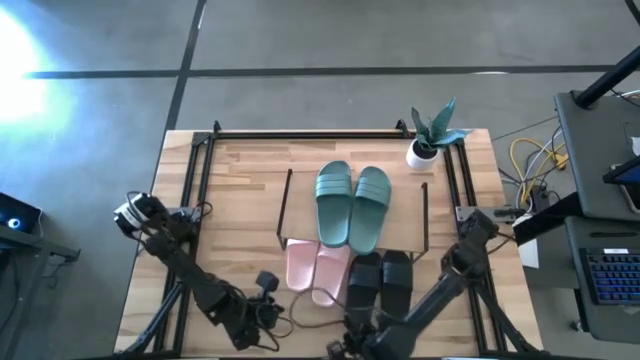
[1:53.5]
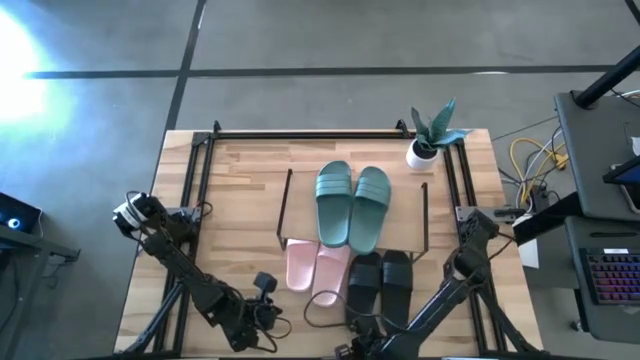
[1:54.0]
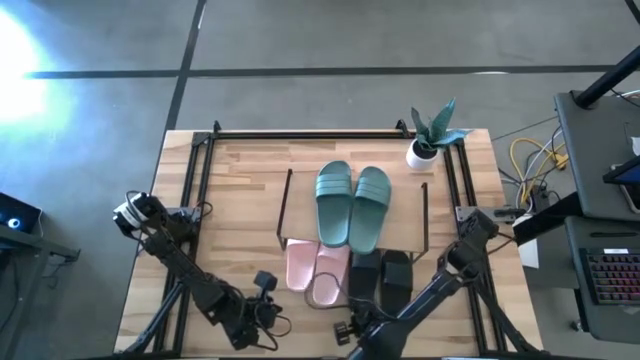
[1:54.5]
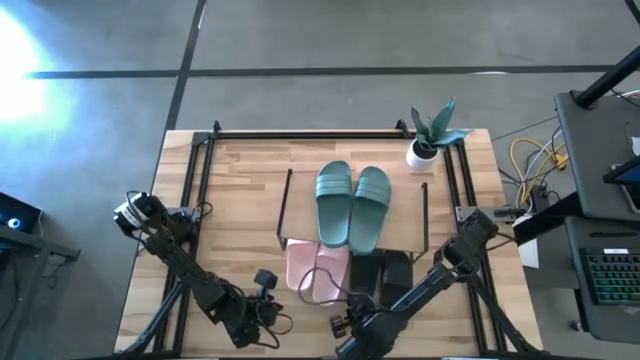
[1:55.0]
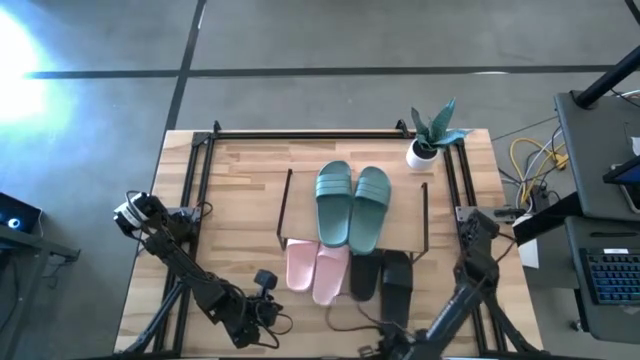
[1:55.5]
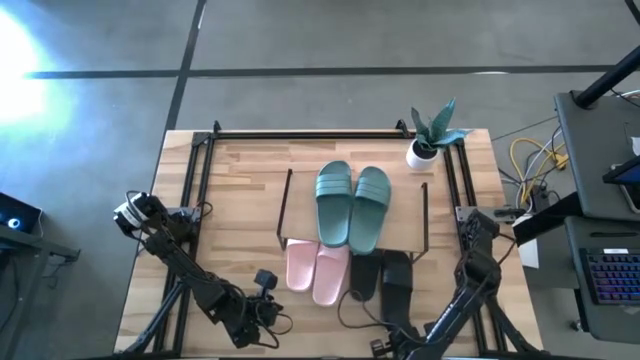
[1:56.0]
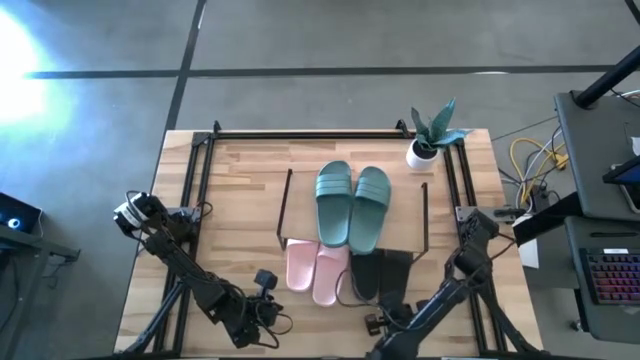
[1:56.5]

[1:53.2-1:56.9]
Task: Pick and place slides into the shelf
Adjust the black slides under the shelf

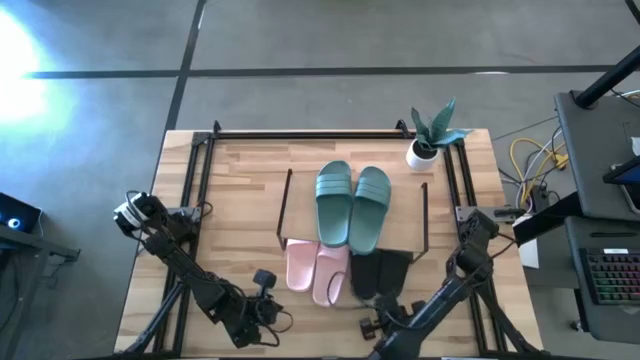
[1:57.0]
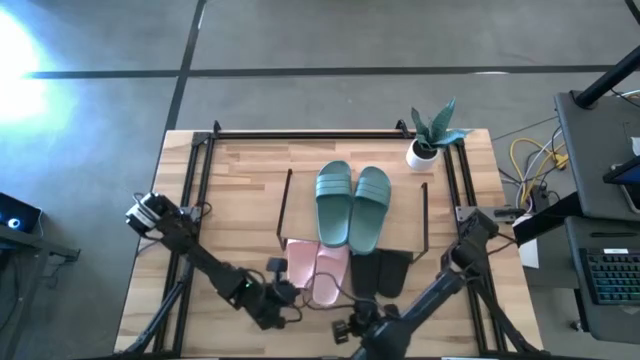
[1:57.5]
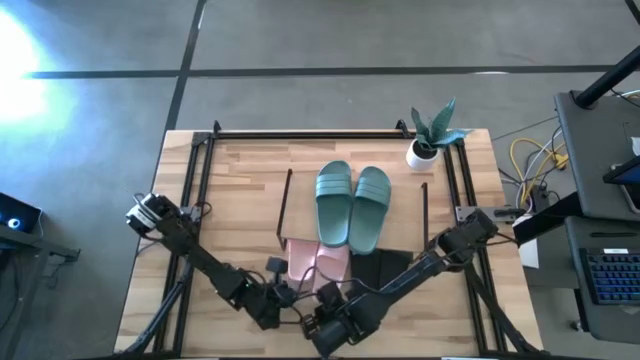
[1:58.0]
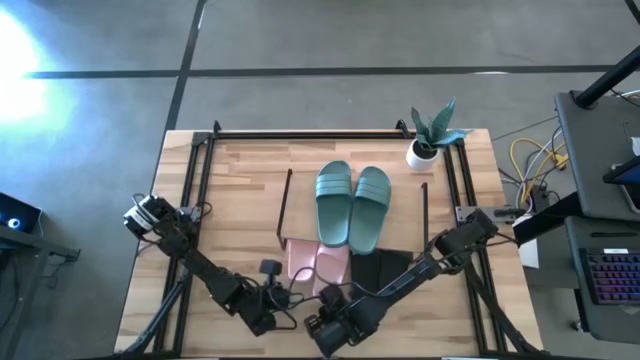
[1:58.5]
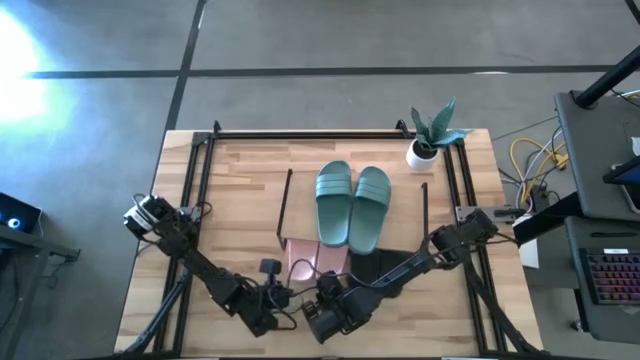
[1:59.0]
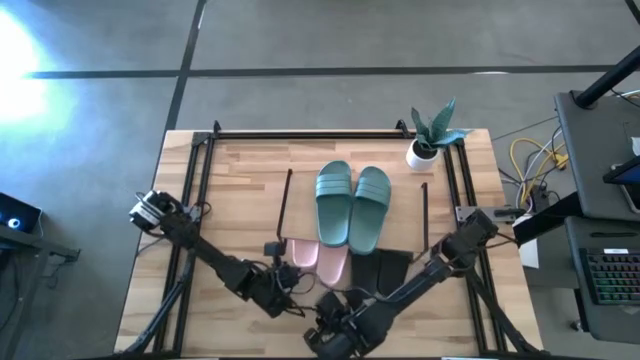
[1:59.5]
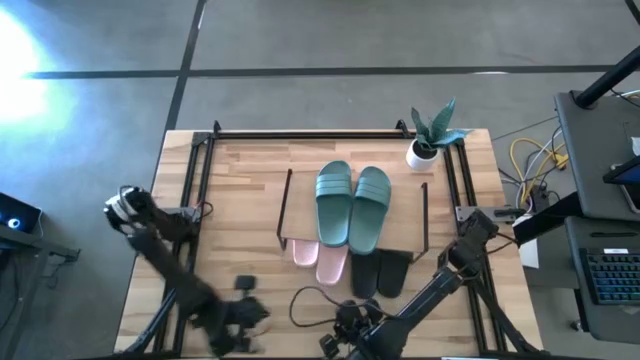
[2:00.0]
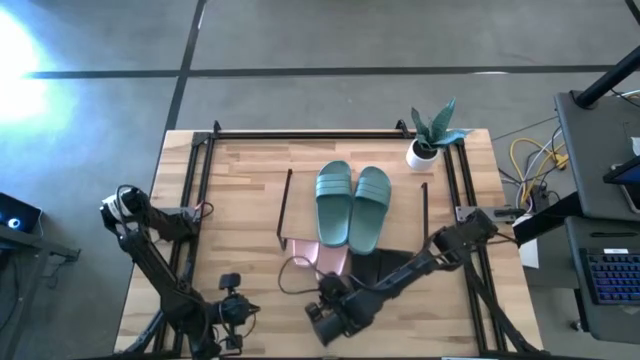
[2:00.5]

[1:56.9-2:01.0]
Adjust the pink slides under the shelf

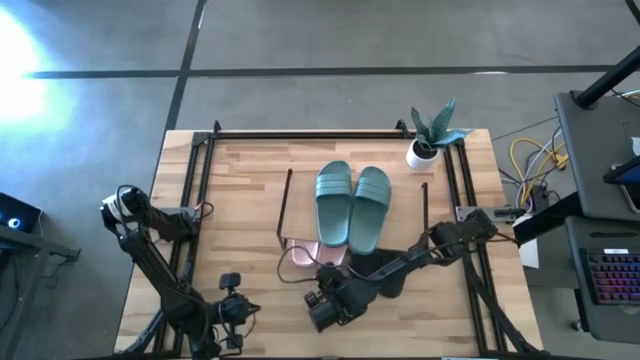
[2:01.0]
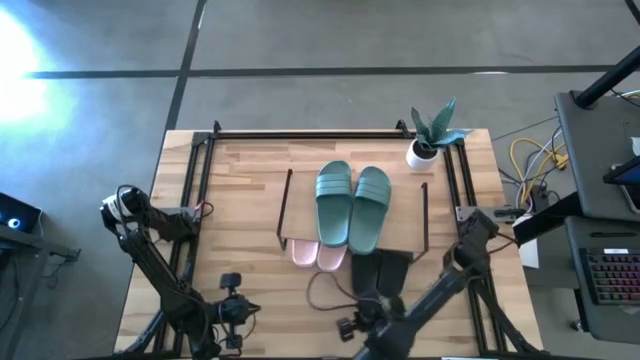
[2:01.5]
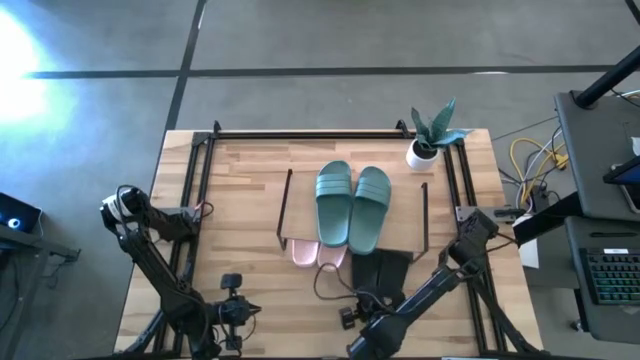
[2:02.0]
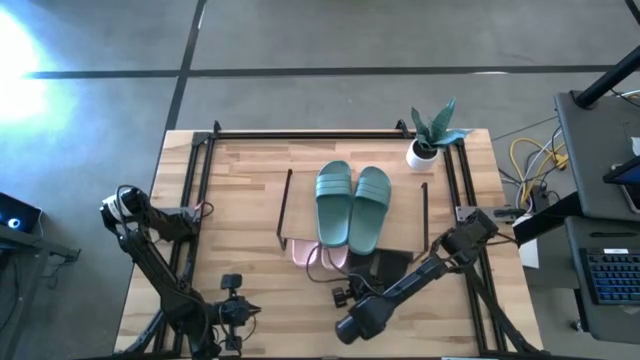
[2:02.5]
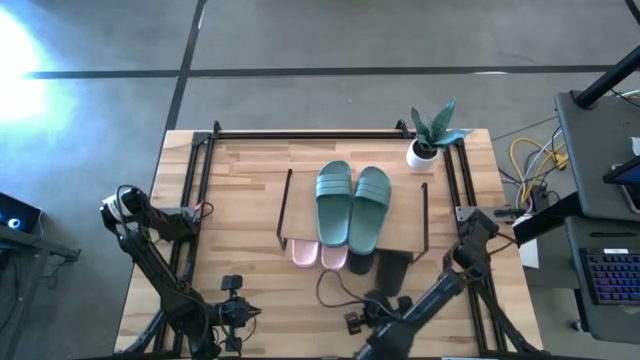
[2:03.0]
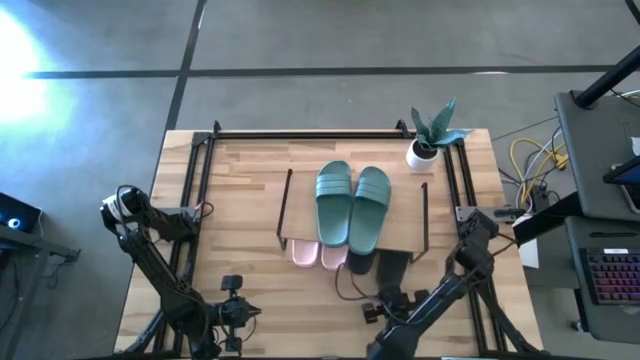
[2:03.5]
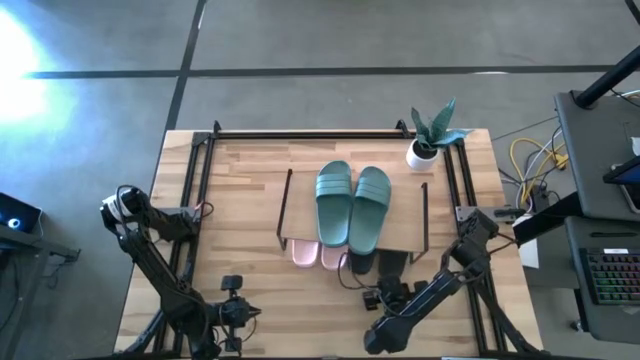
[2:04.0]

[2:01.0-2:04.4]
Adjust the black slides under the shelf

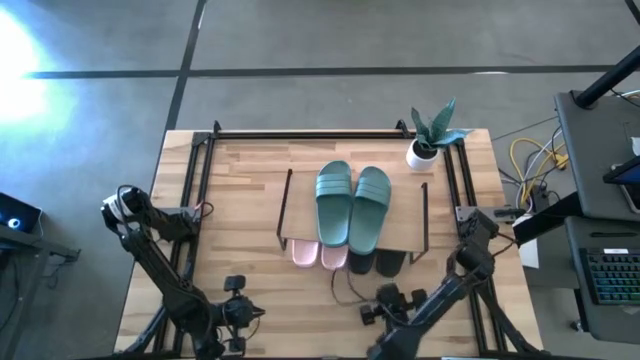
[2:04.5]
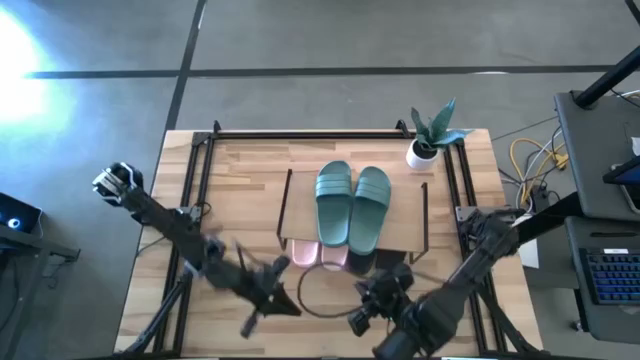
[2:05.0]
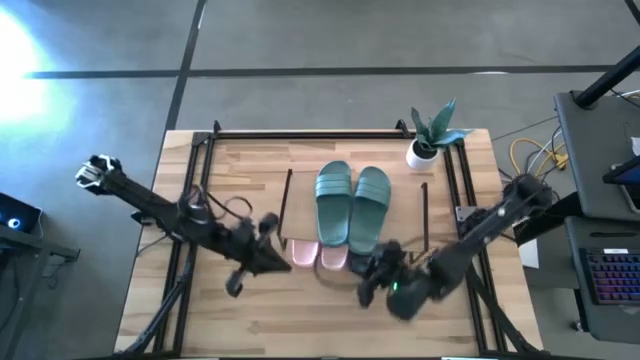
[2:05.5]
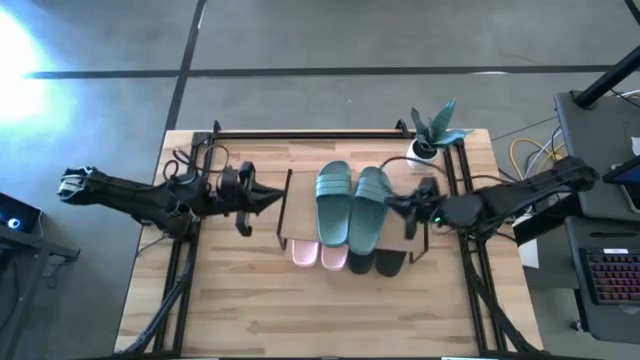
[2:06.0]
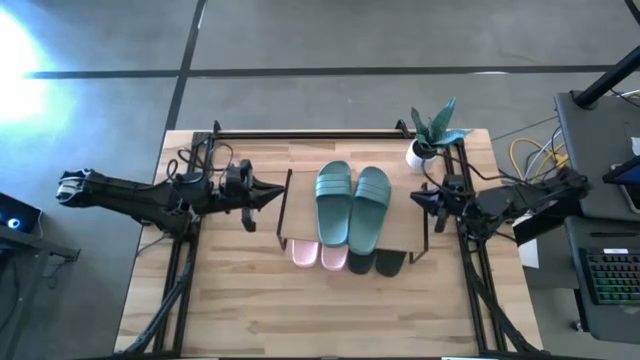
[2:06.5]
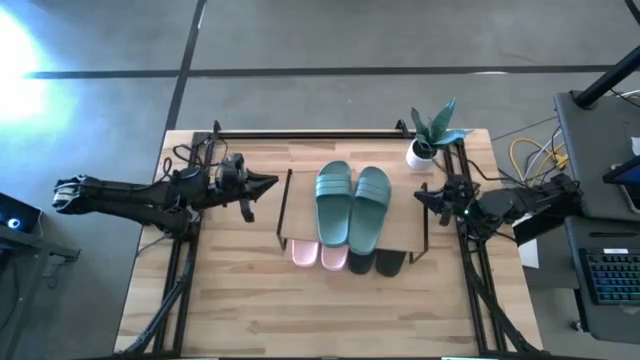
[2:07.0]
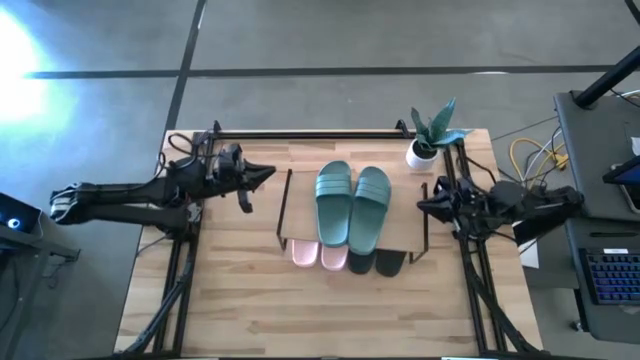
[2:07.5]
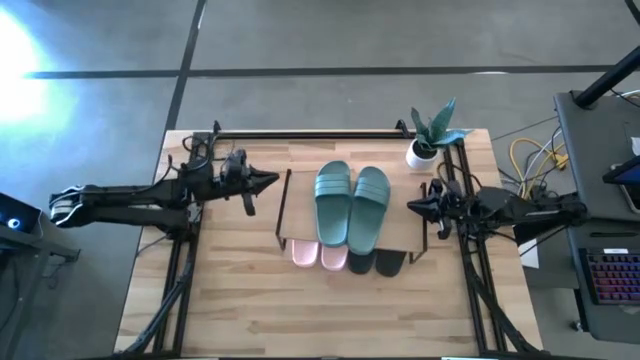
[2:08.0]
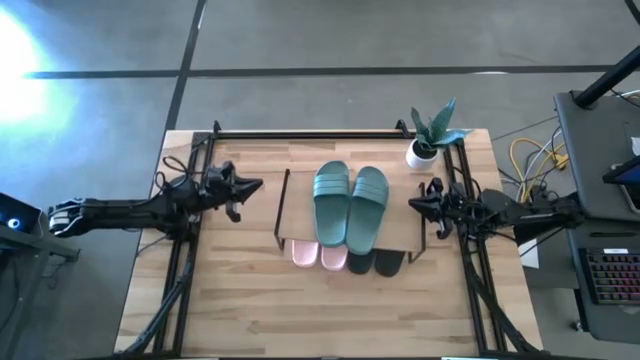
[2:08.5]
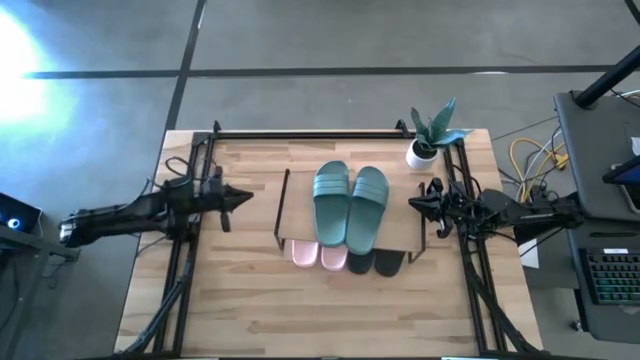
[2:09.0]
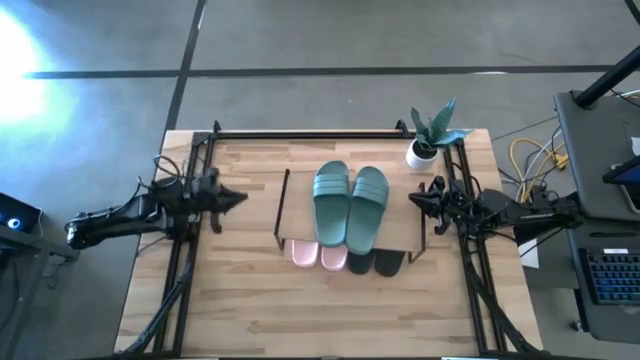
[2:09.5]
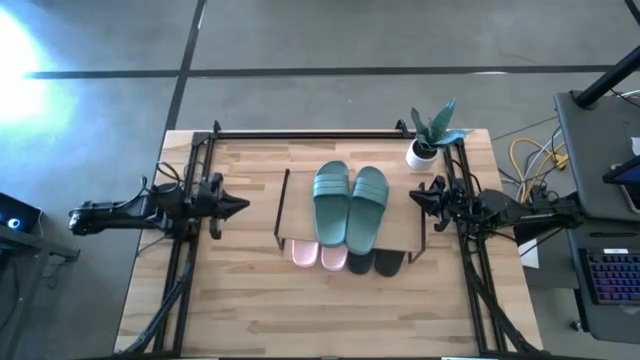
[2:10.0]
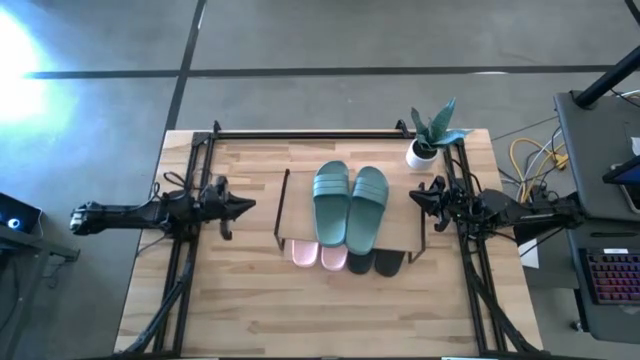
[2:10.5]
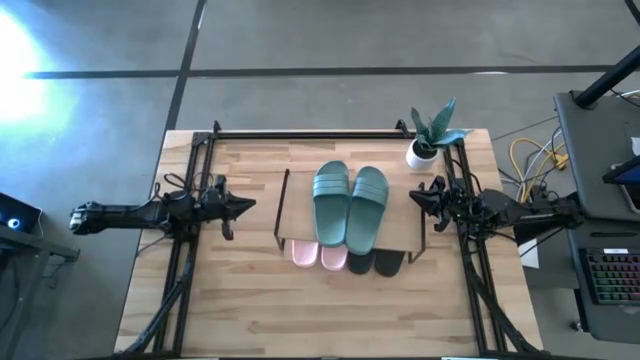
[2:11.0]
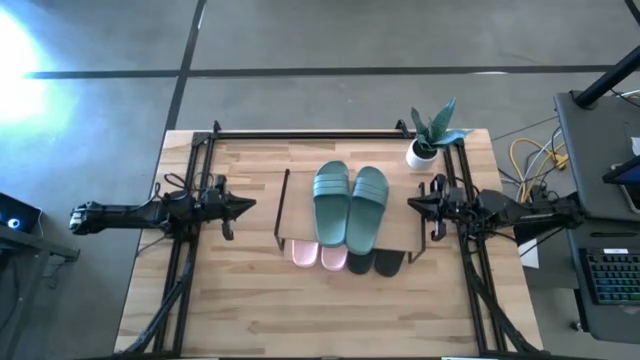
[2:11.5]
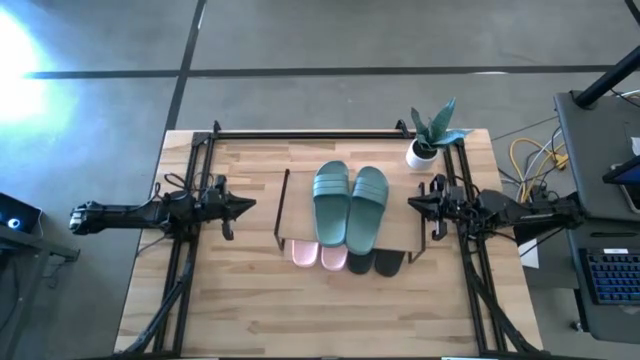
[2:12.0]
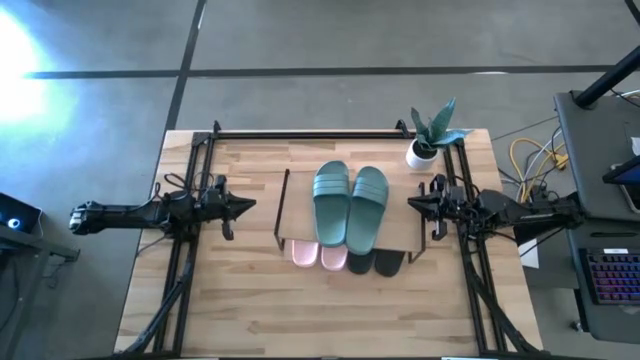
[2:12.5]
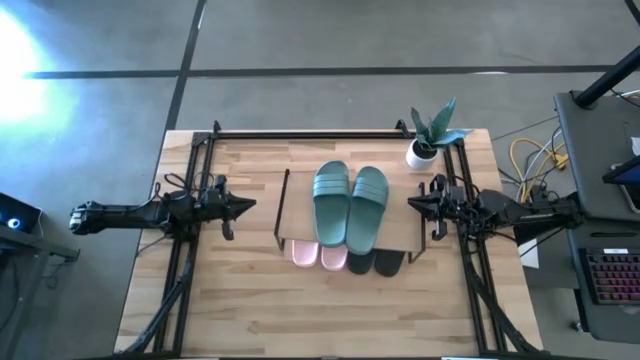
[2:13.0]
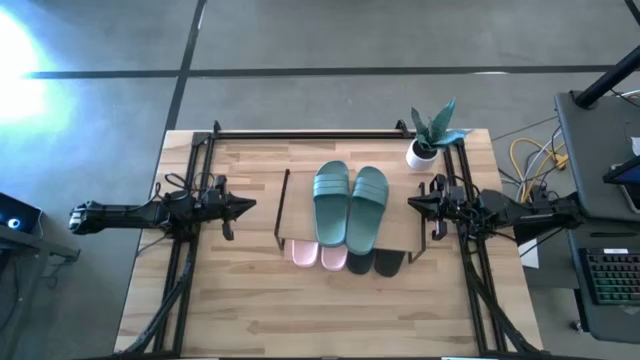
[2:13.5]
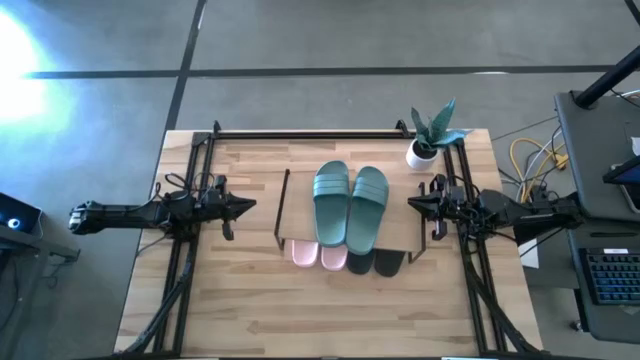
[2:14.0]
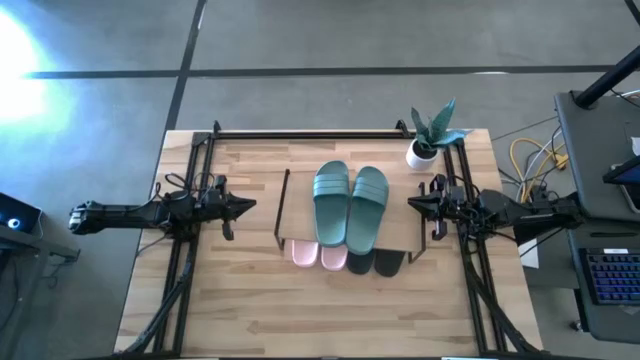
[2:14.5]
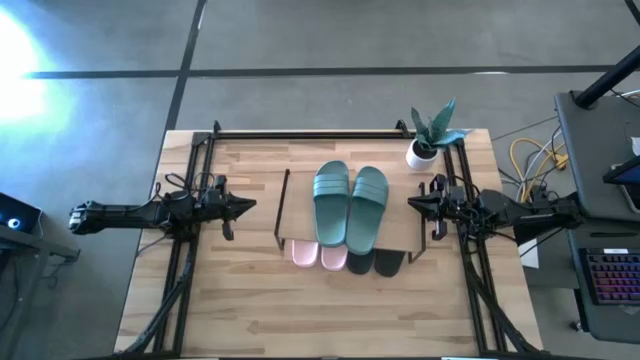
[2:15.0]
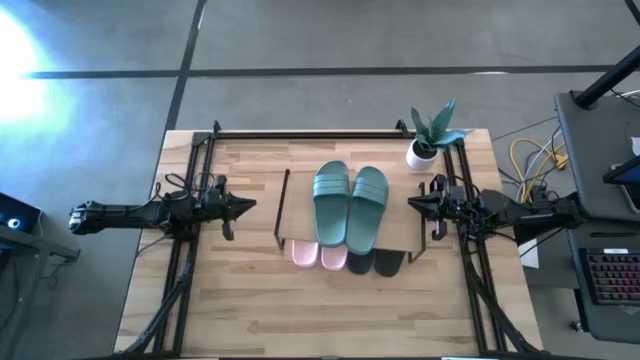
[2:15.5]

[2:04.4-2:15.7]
Return to Home Position
